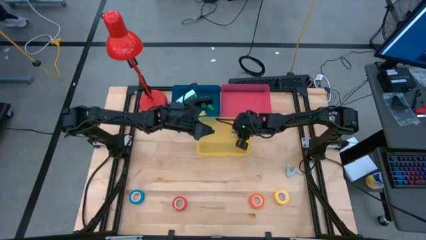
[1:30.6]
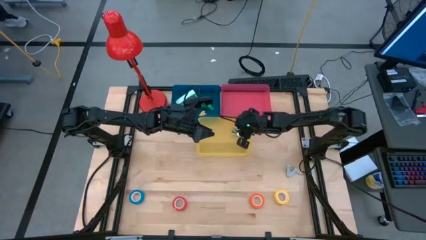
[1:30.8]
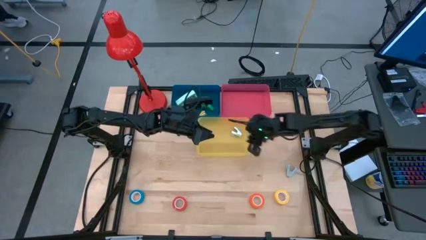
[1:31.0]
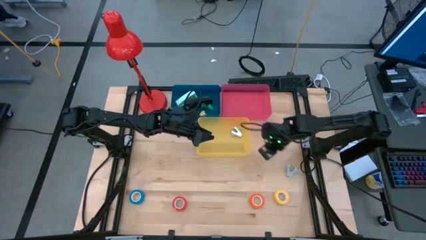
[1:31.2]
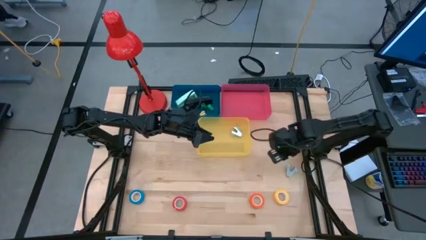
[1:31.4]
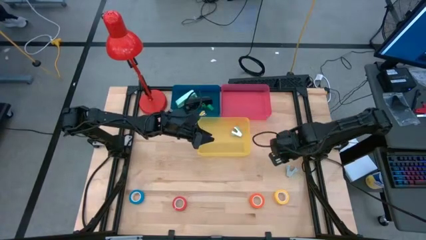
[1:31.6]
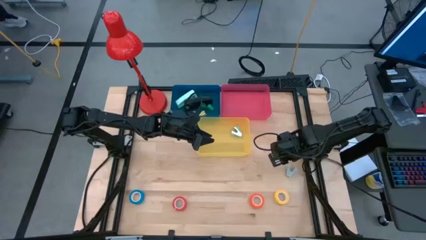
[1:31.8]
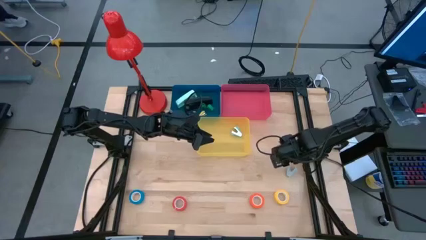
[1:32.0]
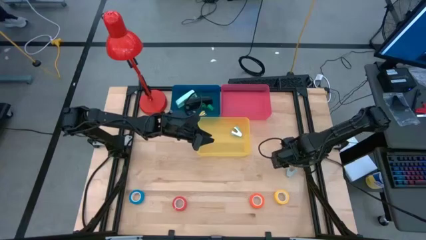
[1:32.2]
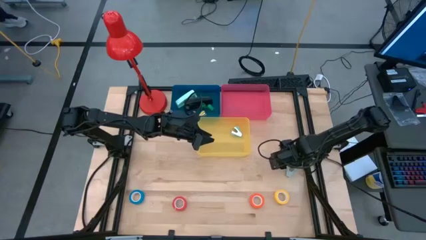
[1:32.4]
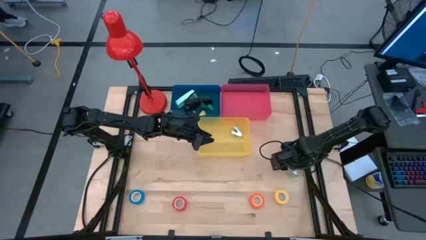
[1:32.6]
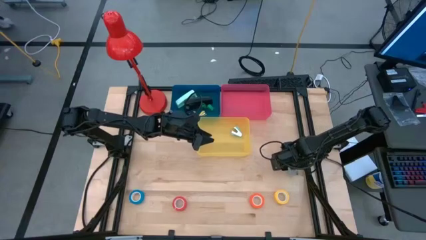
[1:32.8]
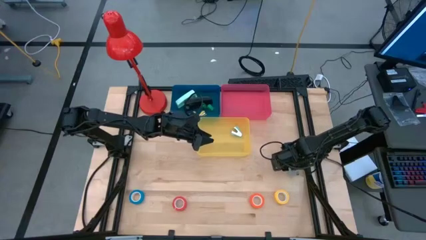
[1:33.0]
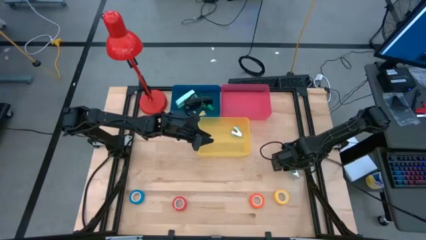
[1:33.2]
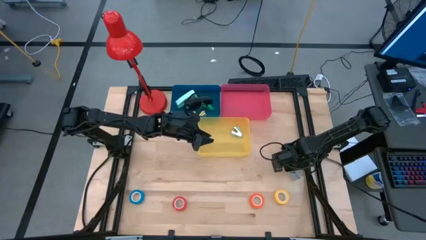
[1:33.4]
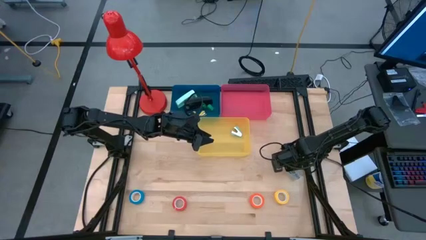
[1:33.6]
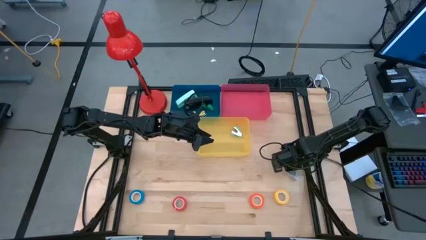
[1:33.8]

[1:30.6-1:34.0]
Task: Pick and place Stapler, Stapler remover, tape
Put the light blue staple remover into the yellow bin

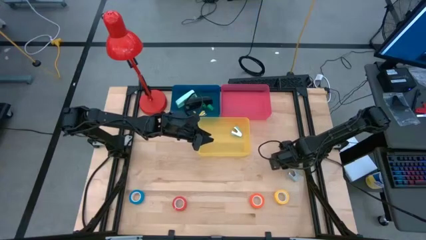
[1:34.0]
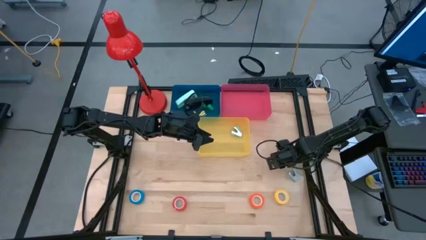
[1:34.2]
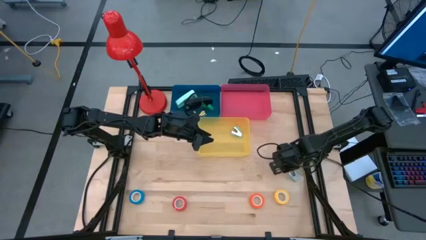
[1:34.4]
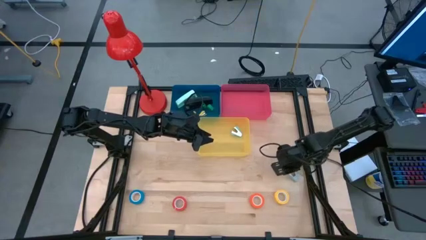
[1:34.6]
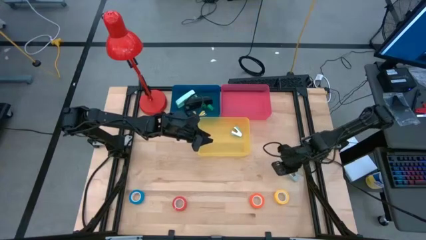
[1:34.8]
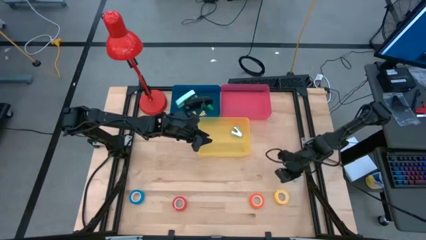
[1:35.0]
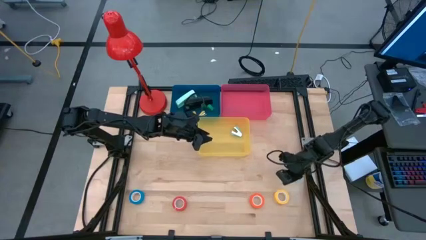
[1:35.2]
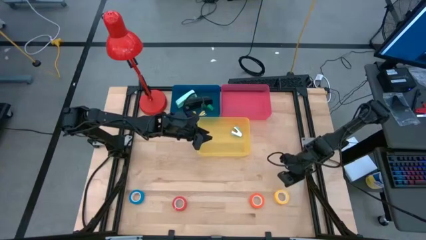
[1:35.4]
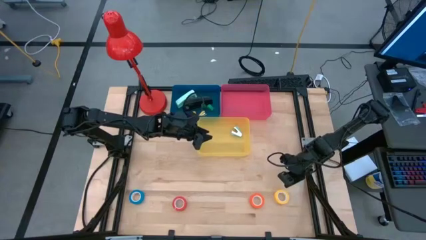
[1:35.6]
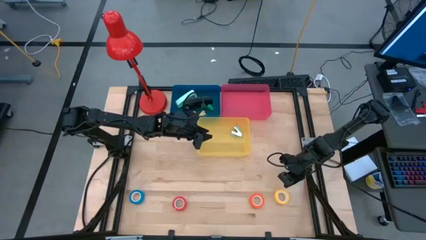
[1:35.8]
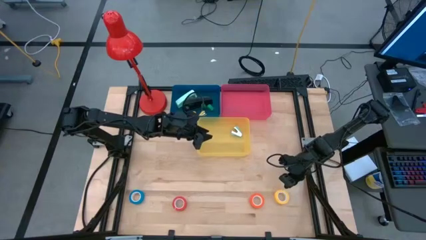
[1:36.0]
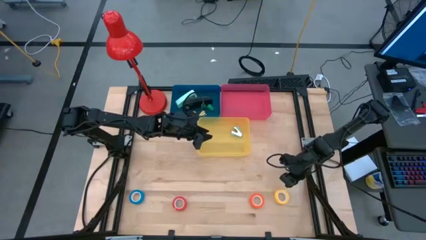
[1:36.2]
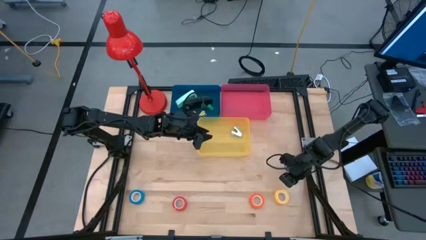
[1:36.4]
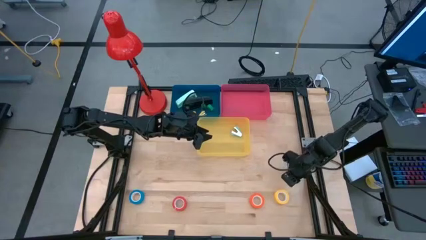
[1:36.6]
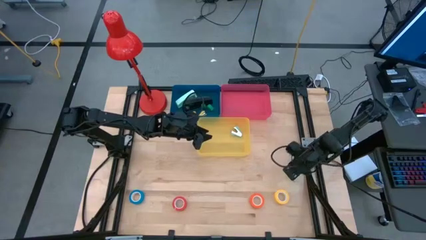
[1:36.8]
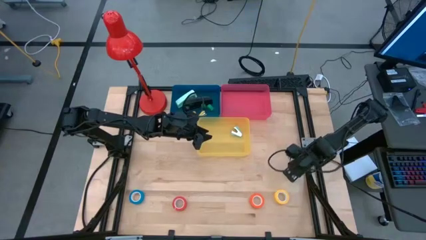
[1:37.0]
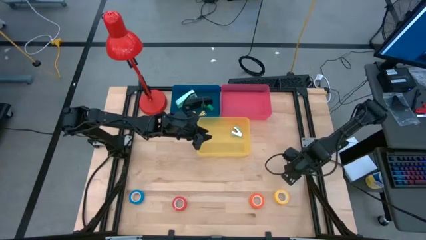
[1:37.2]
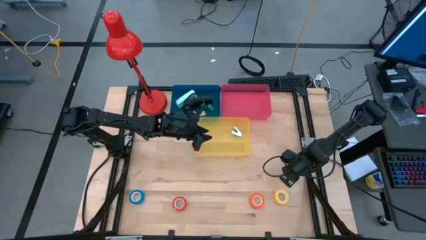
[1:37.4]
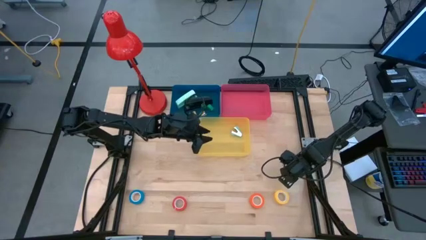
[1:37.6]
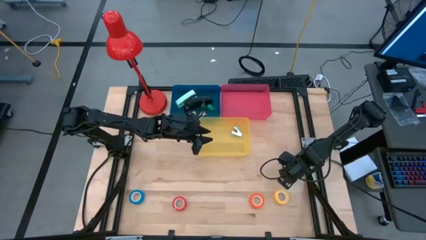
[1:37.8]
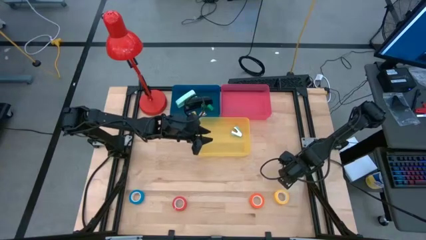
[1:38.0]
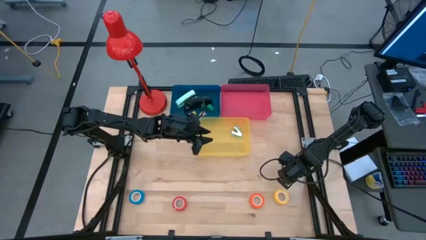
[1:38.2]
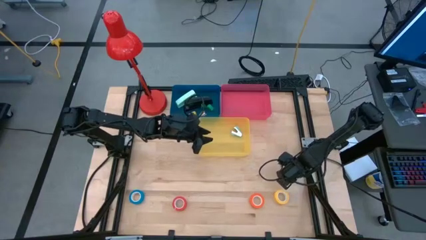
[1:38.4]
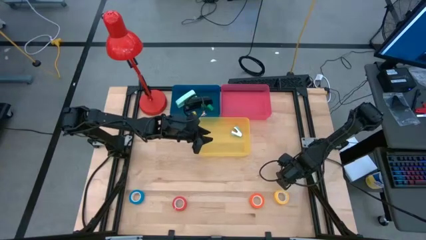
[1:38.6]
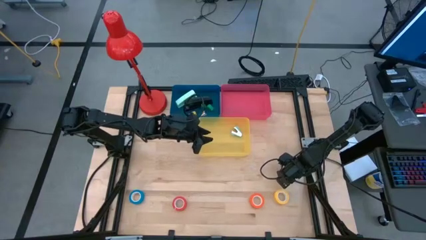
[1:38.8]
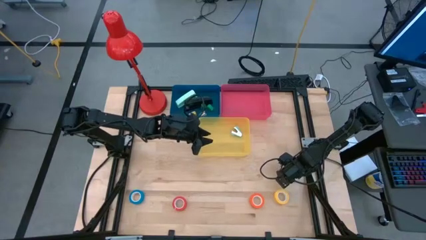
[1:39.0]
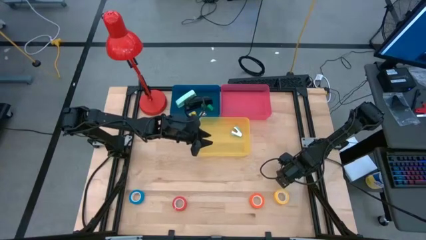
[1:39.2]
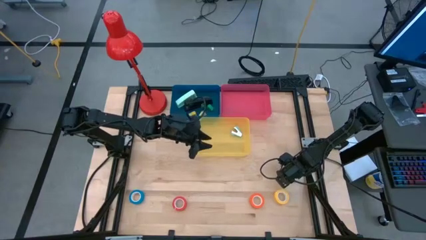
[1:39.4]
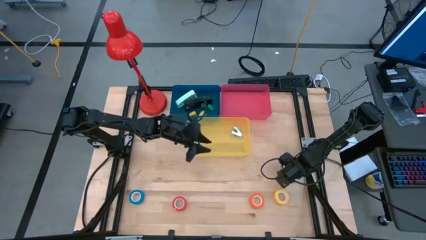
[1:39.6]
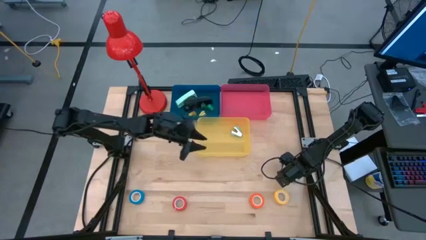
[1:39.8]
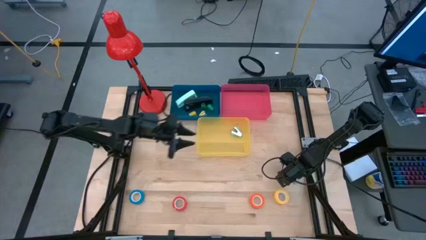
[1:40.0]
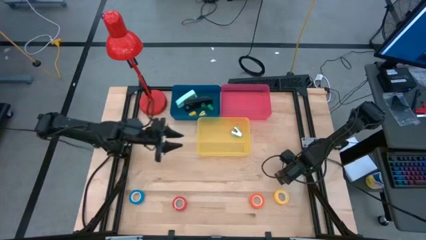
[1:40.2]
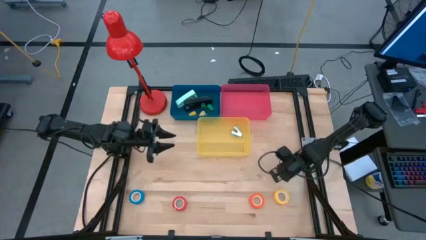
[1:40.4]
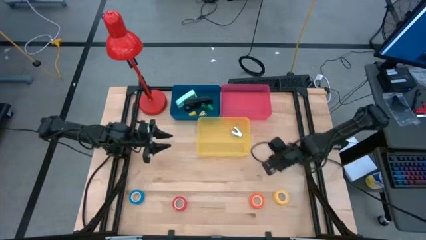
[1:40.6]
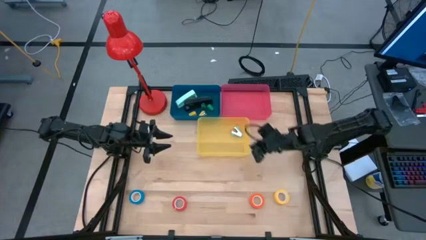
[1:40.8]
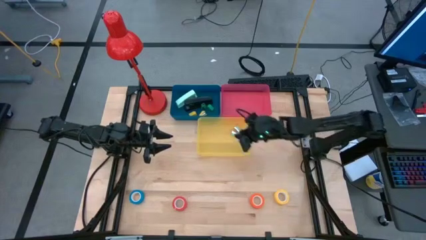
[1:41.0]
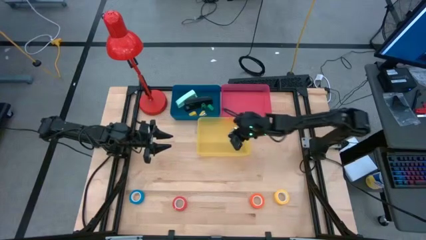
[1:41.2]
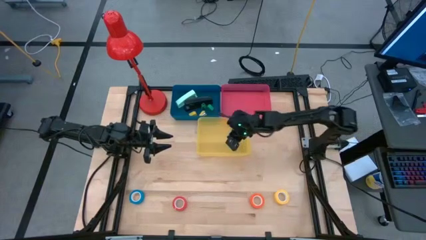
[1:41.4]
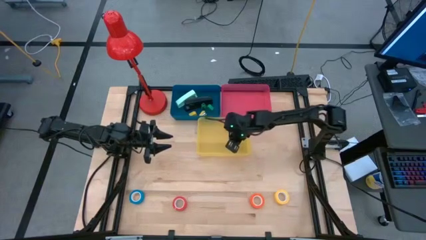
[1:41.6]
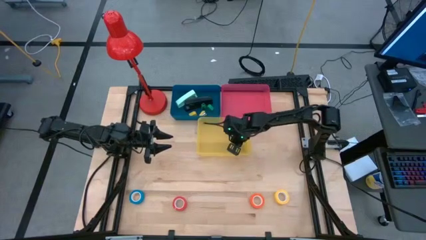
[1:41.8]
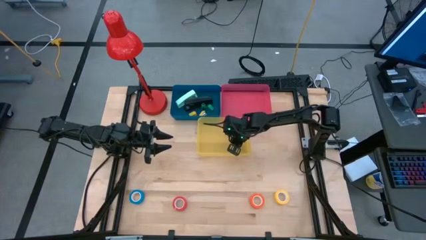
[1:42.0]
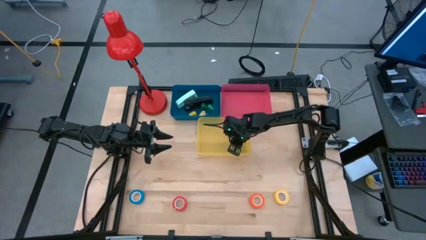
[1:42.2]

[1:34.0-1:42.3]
Put the light blue staple remover into the yellow bin

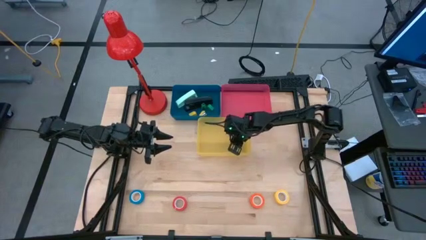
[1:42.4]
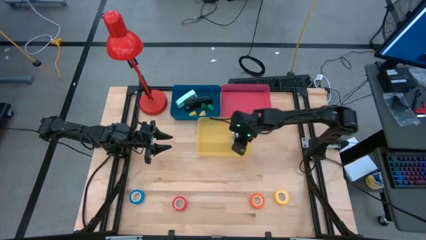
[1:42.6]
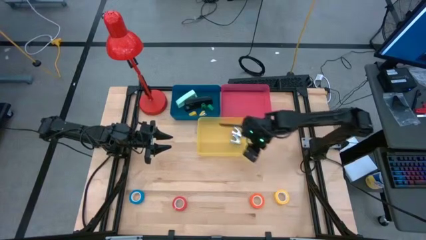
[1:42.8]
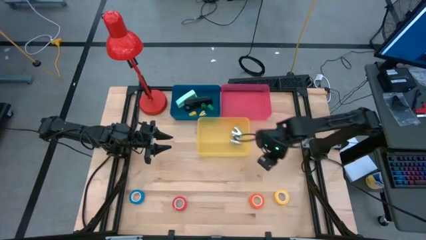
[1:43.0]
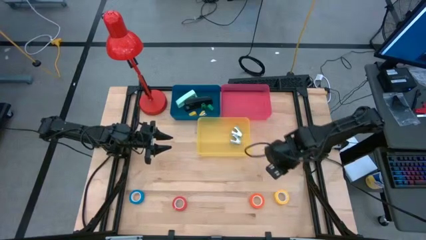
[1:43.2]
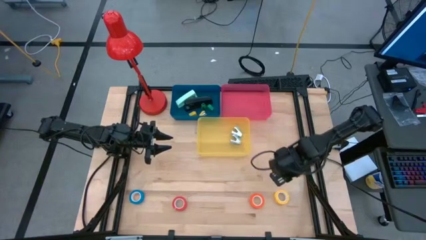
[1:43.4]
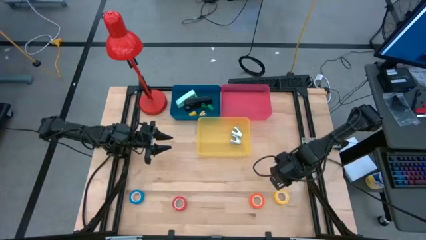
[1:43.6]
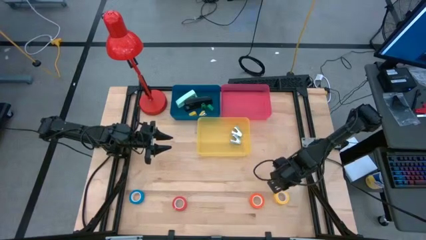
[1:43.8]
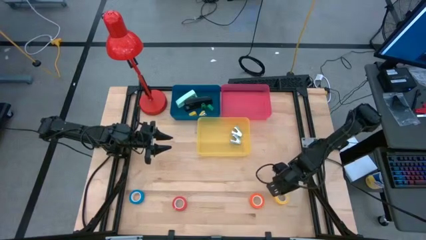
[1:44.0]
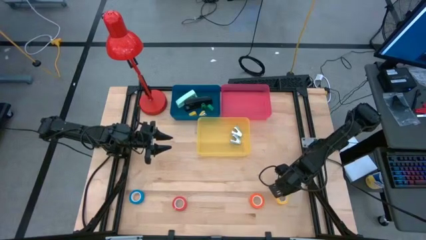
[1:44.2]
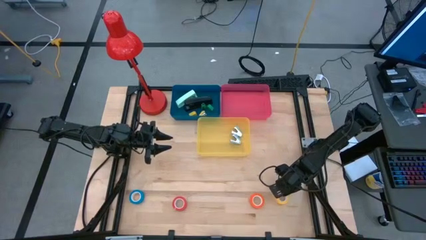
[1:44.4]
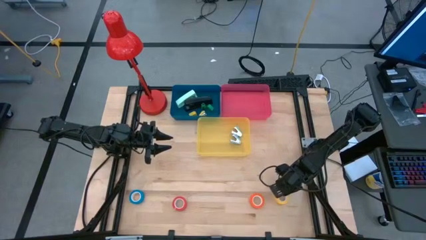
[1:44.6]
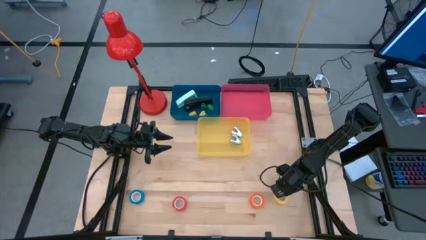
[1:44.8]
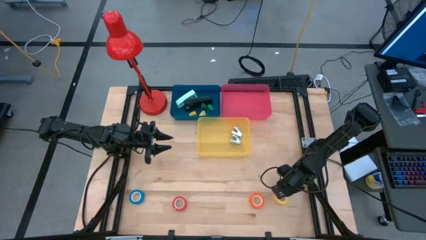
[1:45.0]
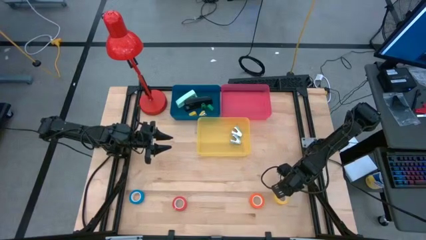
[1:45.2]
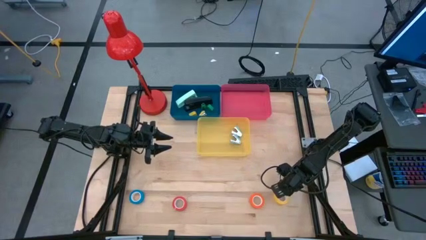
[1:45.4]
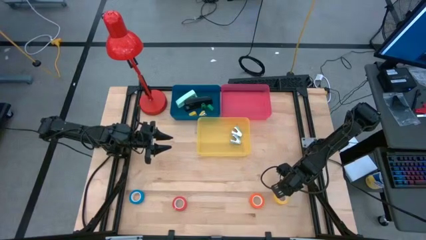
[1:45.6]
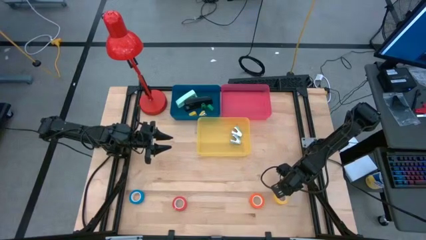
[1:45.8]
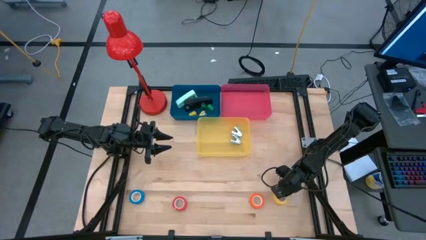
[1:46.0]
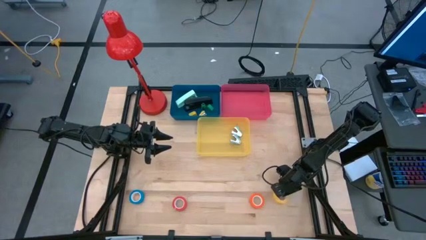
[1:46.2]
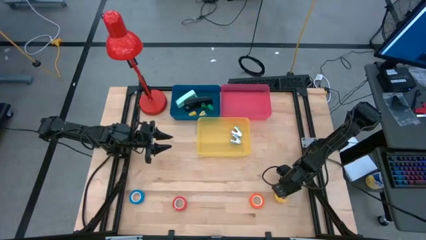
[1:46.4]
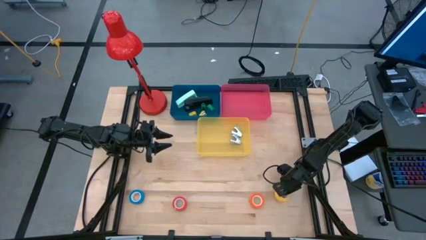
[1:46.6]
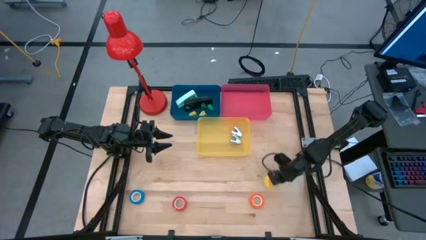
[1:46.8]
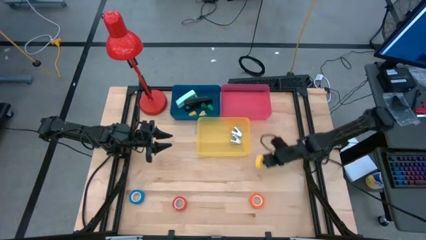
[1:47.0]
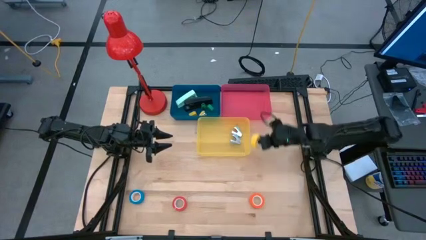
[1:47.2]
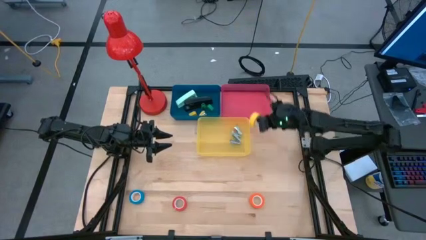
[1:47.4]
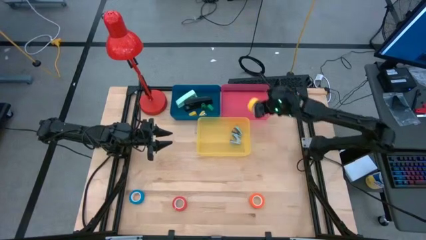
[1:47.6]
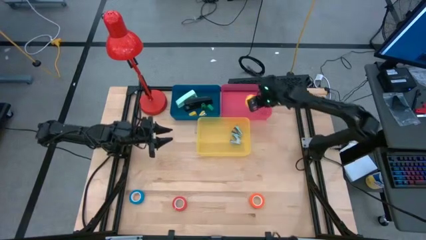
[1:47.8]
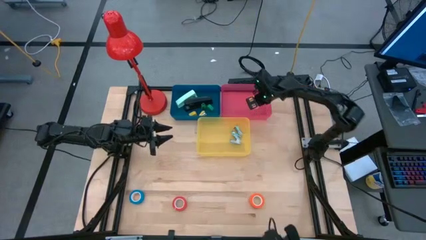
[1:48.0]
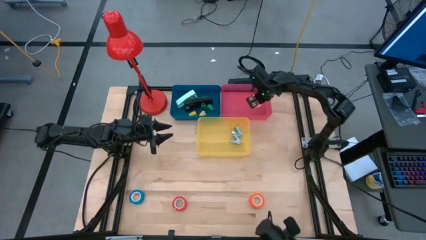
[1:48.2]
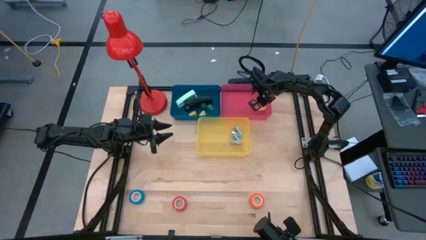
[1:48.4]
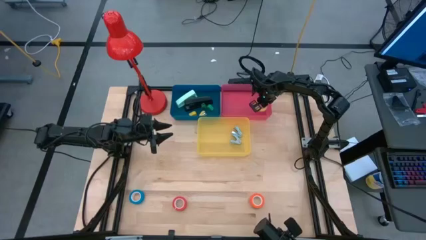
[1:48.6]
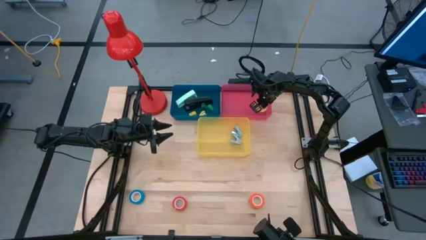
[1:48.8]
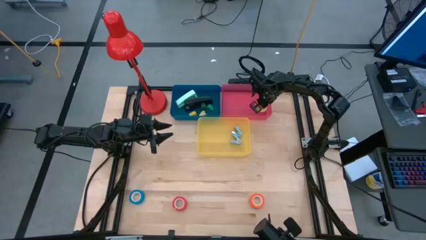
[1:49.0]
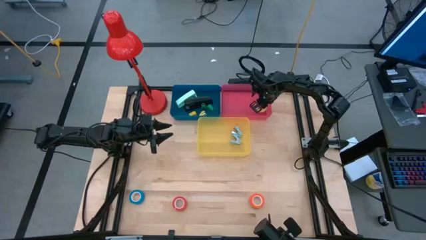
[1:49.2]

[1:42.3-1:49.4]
Put the yellow tape into the red bin
